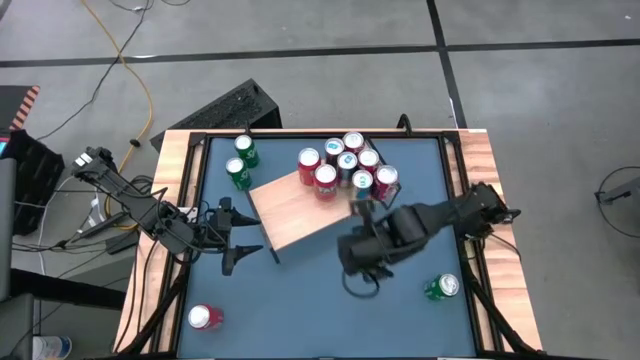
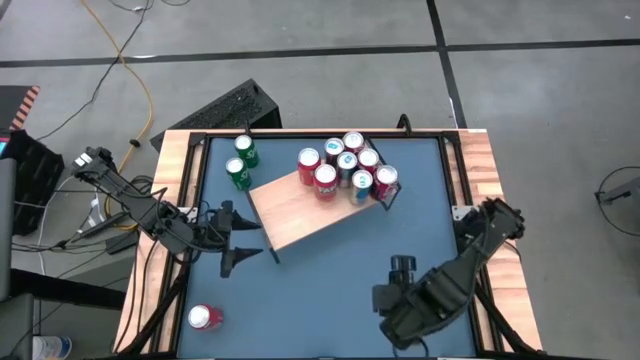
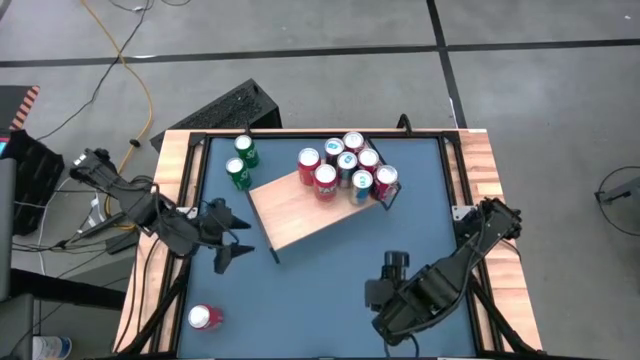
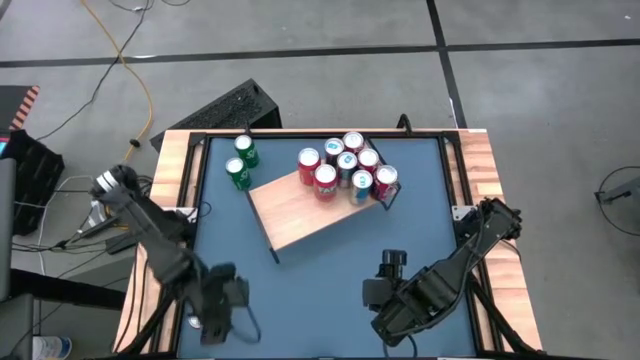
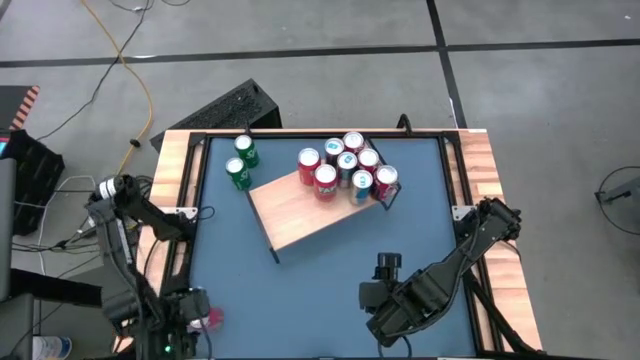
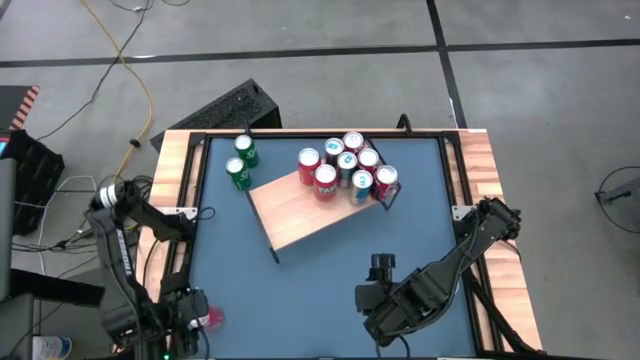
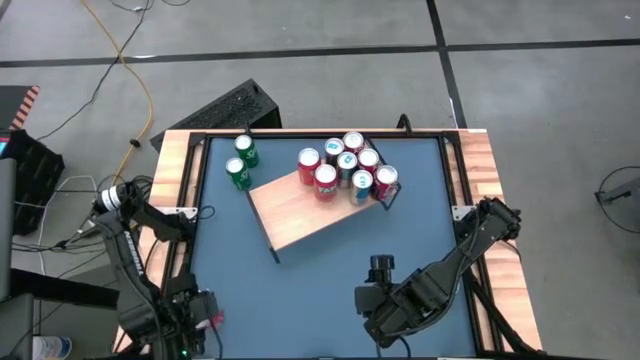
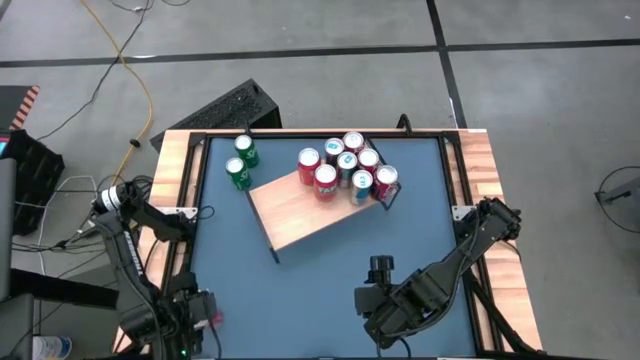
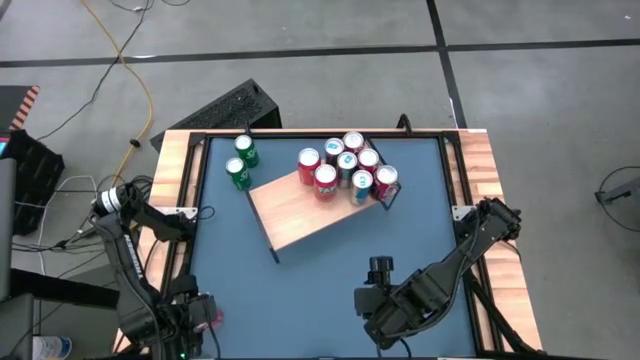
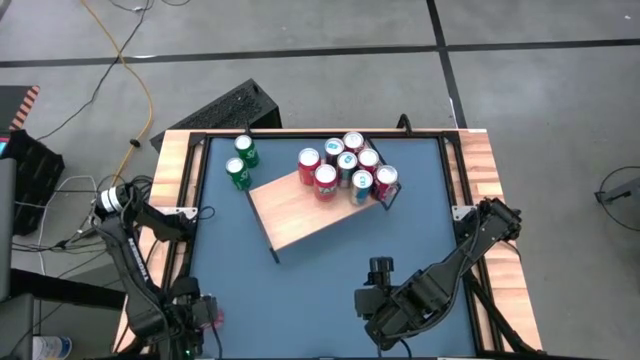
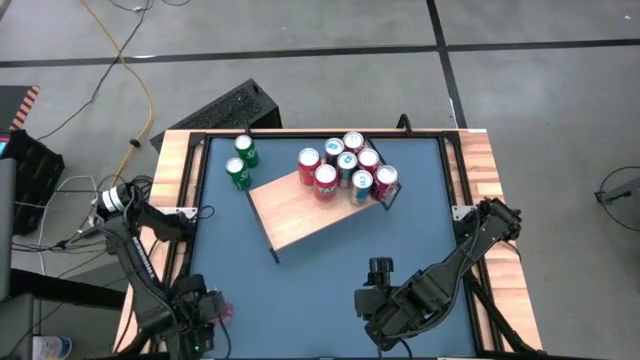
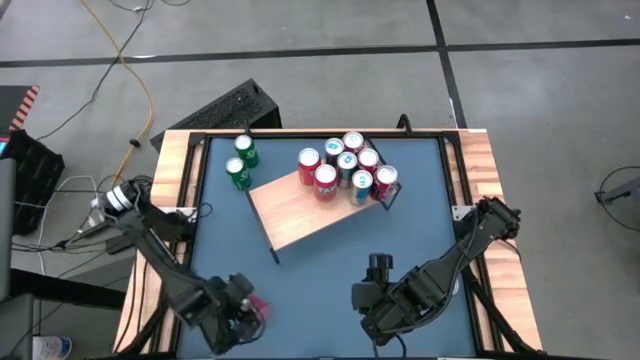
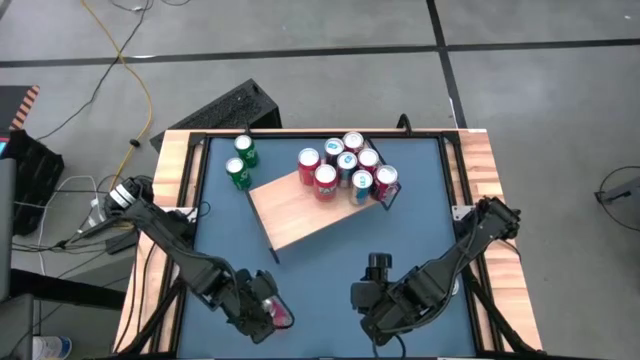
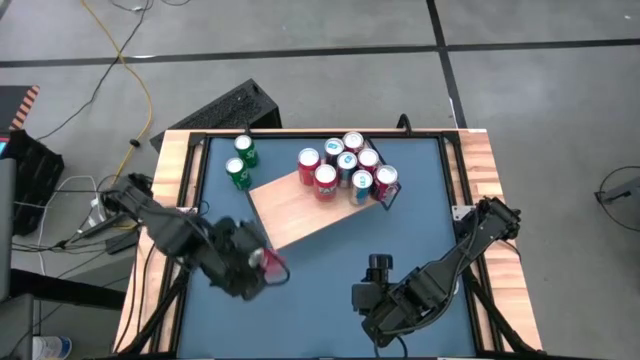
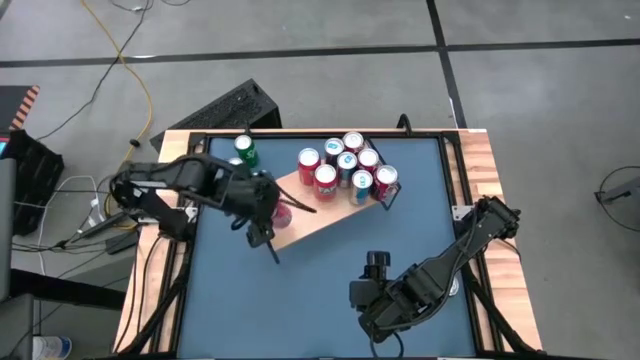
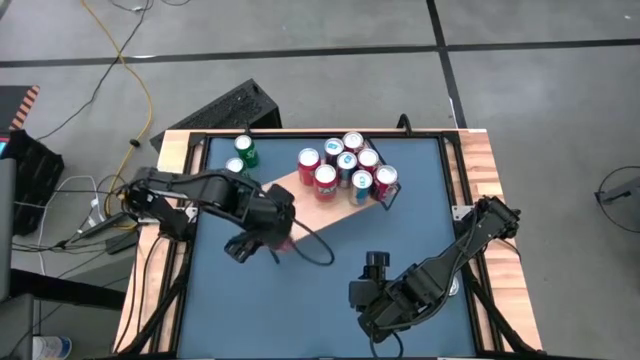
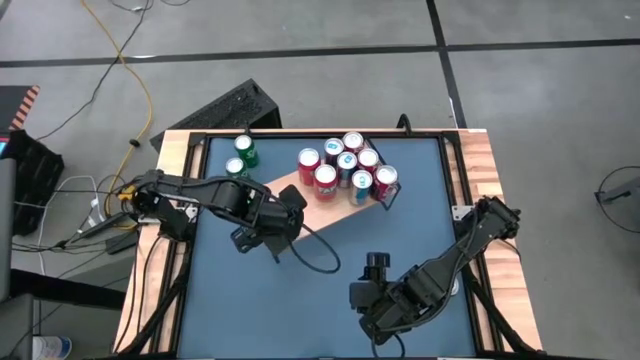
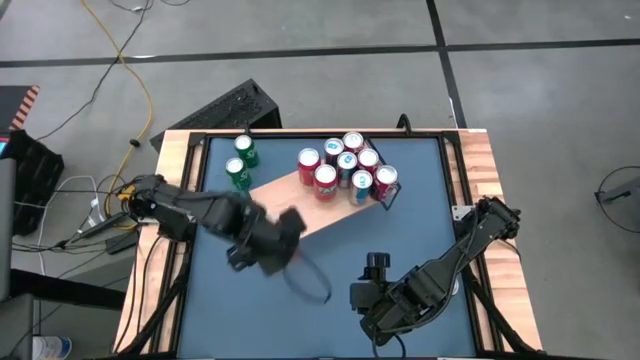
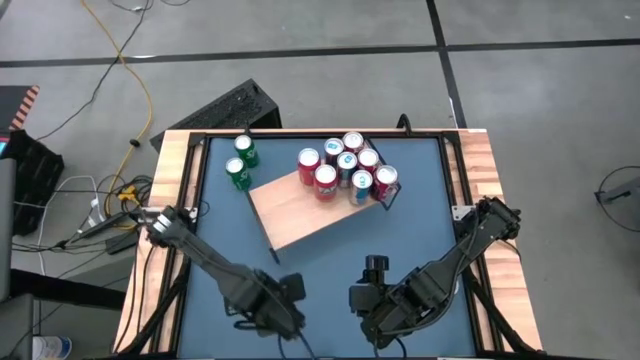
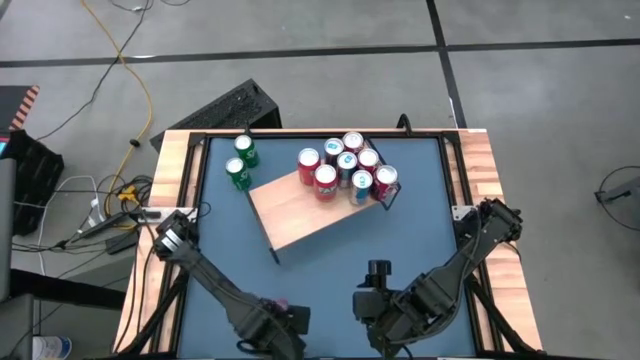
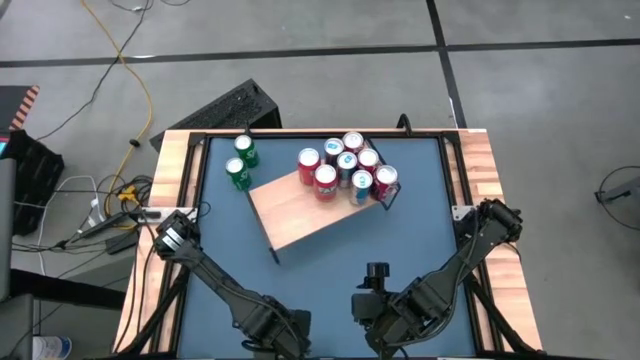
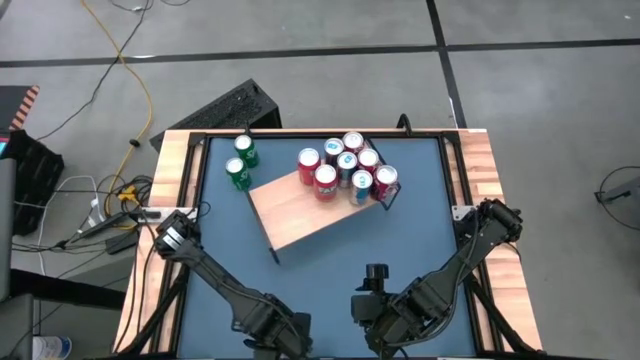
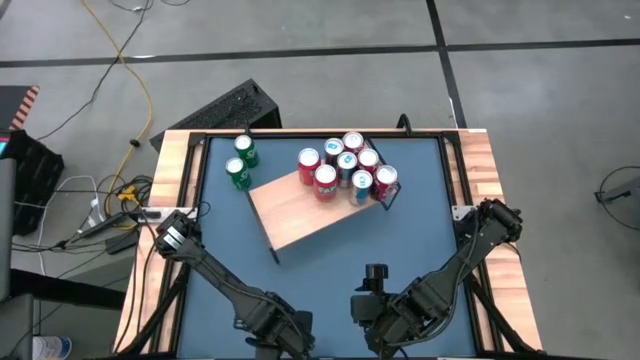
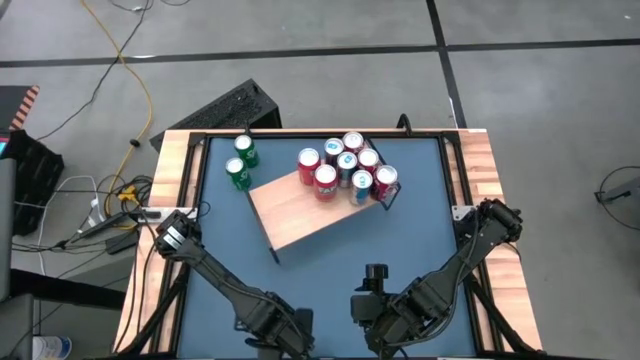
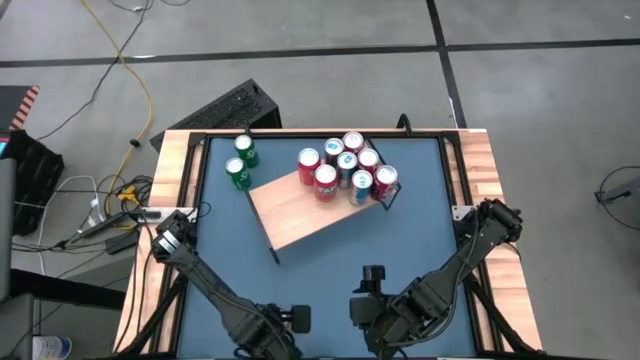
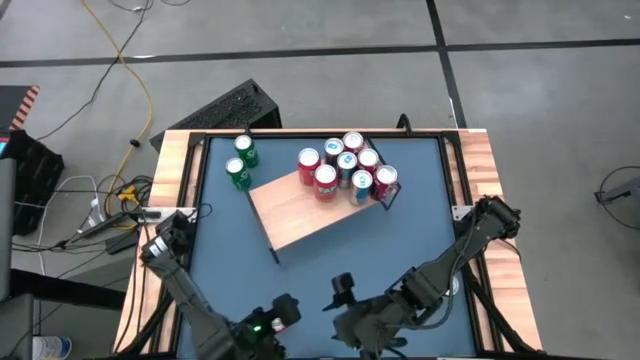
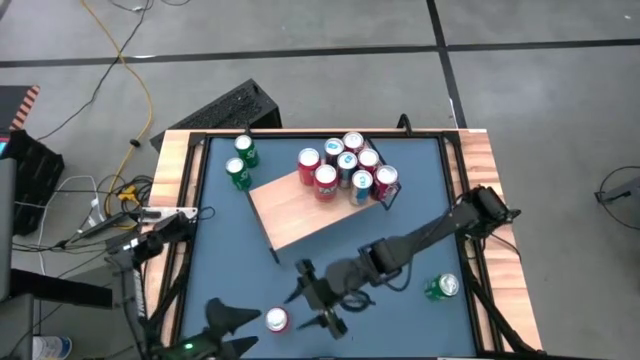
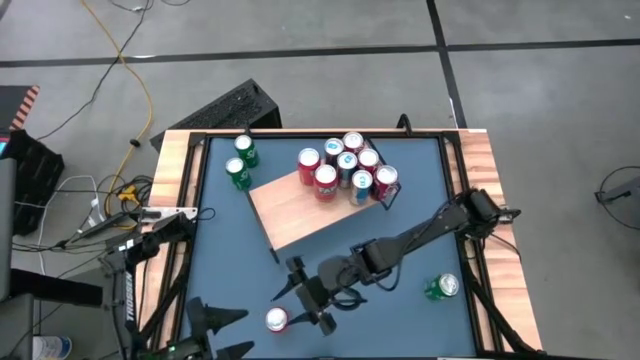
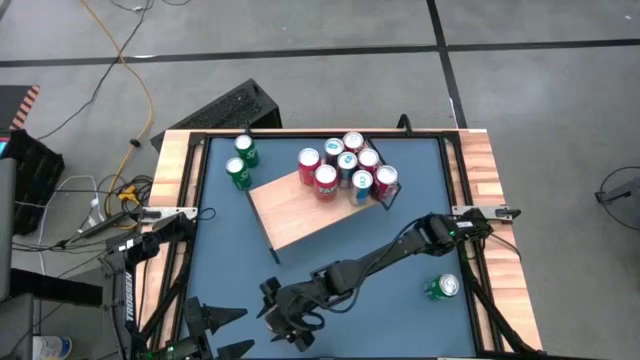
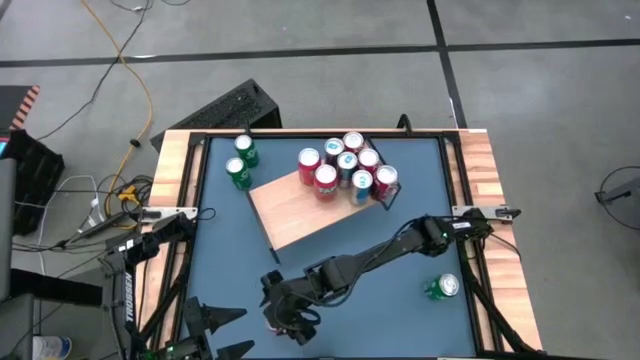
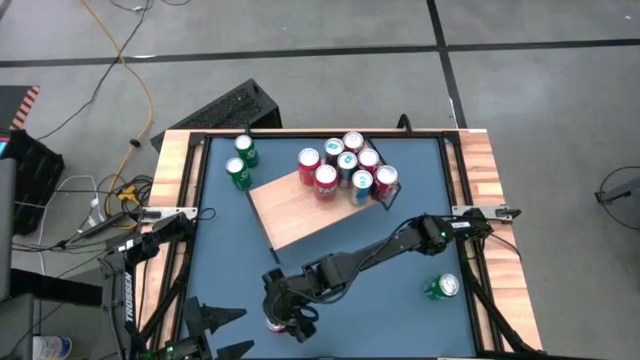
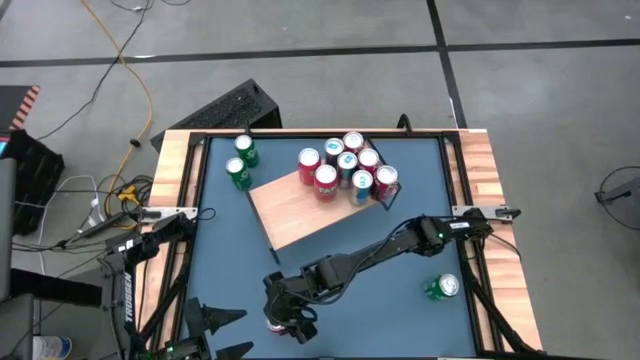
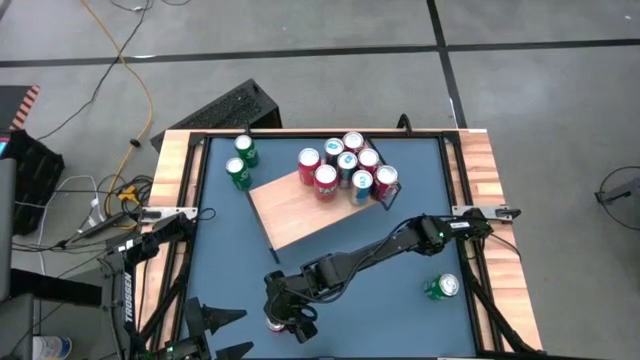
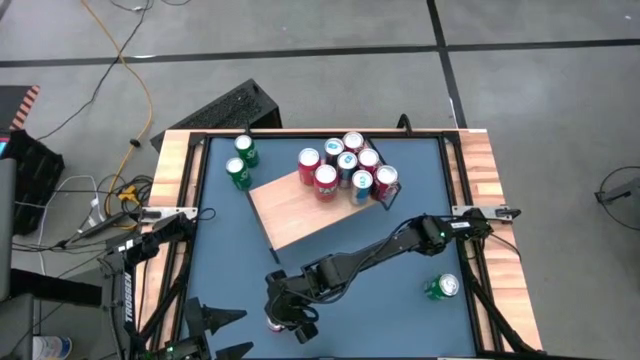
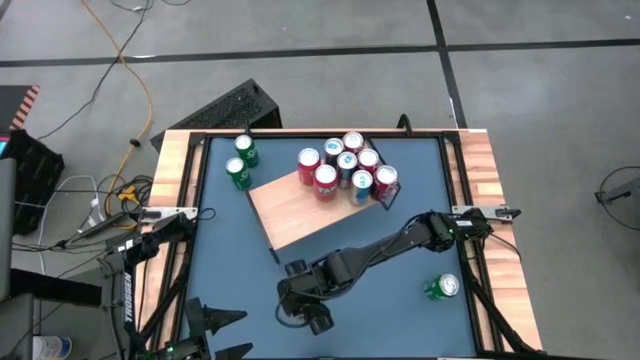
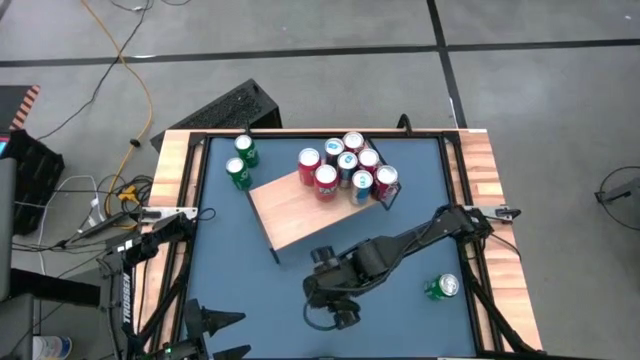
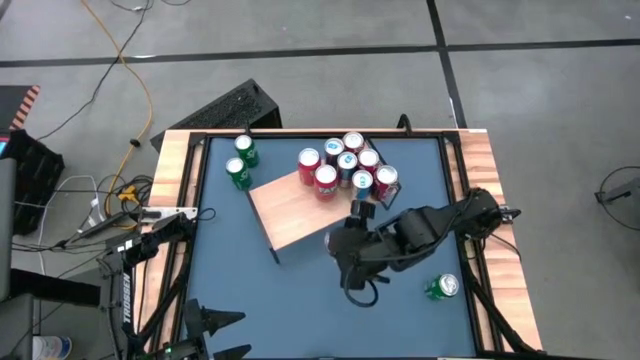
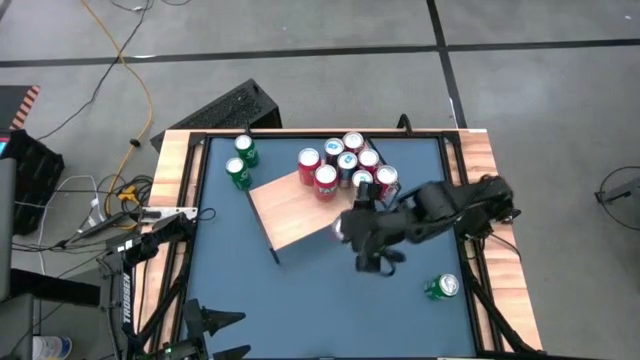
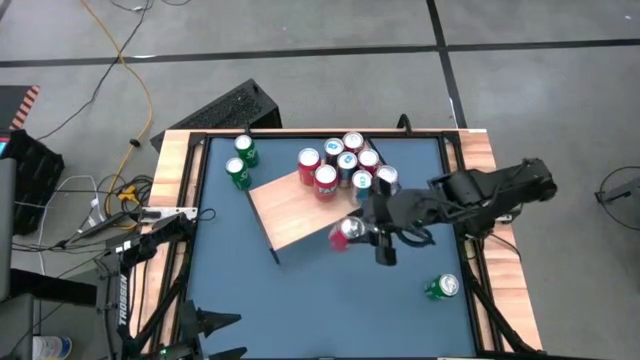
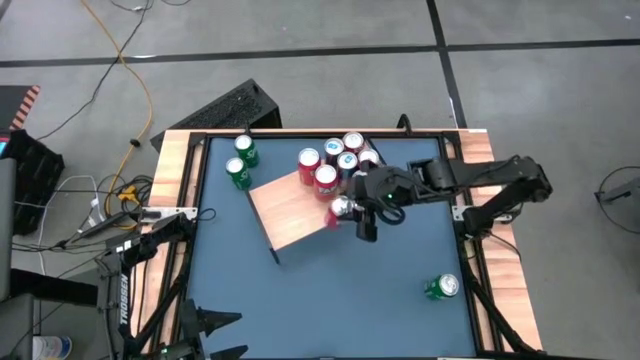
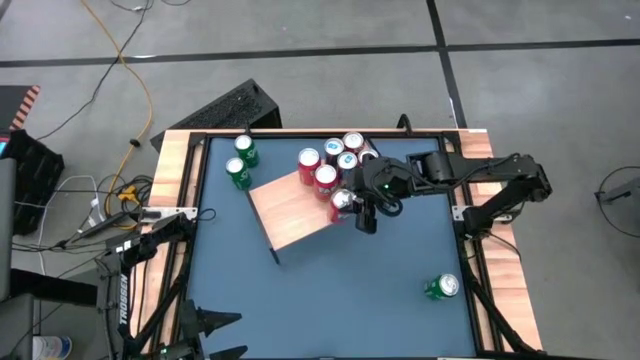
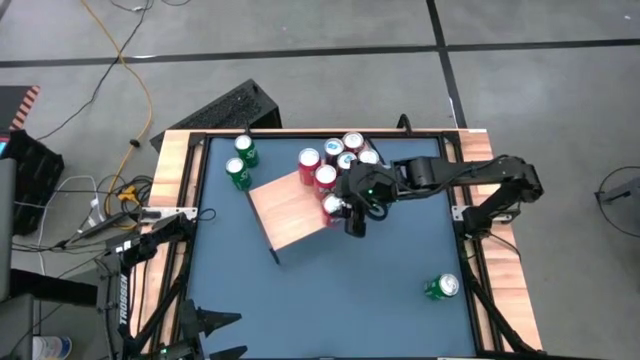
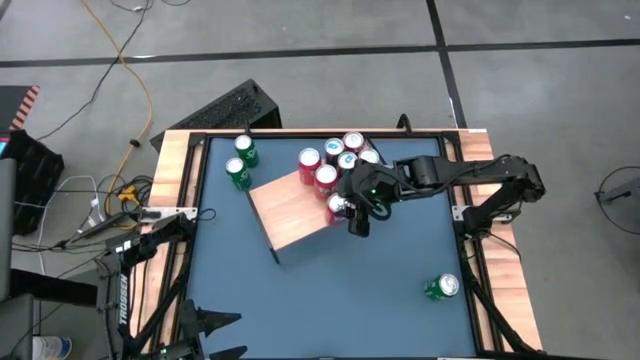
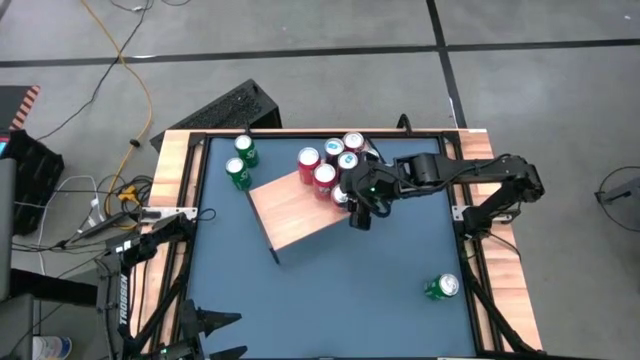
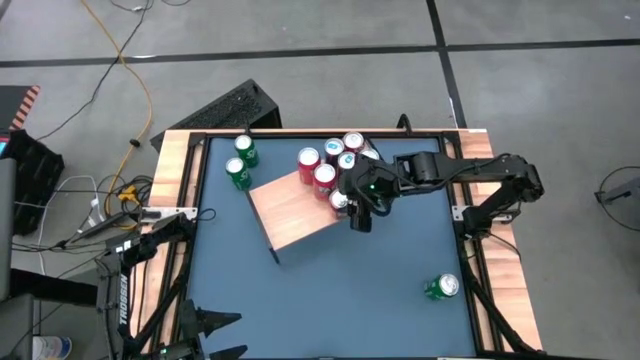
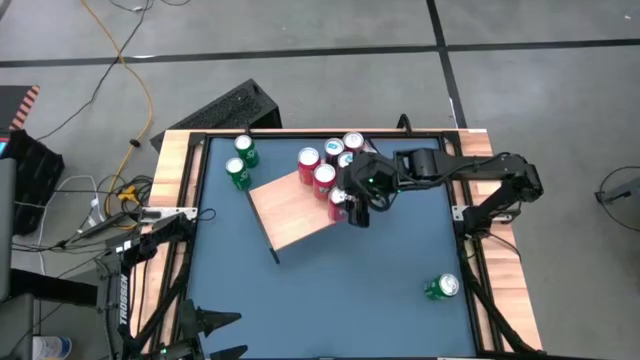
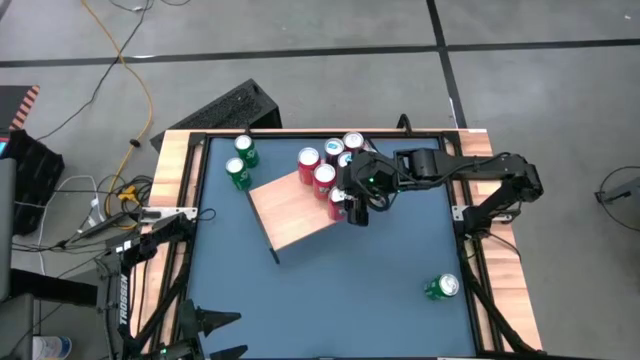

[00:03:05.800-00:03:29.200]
Task: Place canned beverage on shelf
Put the red soda can on the shelf aligned with the other red soda cans
